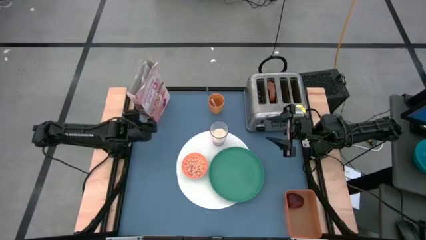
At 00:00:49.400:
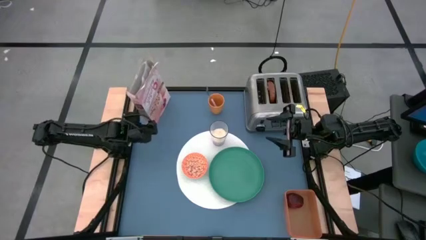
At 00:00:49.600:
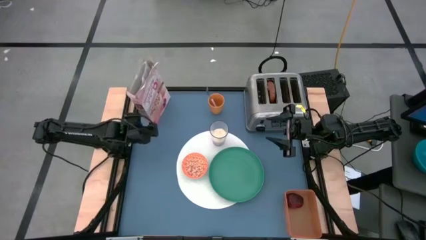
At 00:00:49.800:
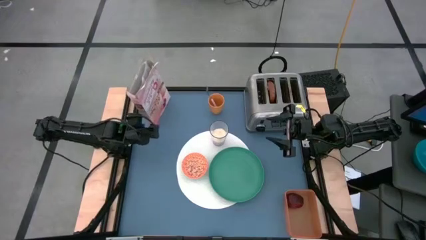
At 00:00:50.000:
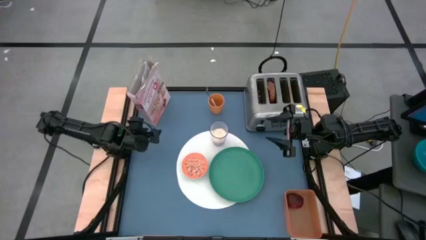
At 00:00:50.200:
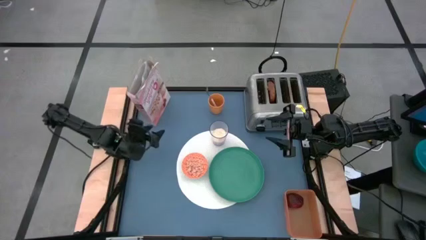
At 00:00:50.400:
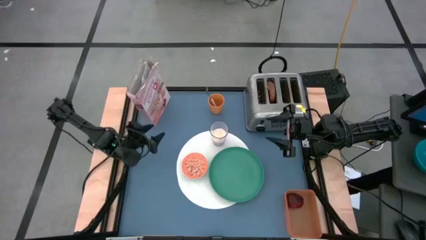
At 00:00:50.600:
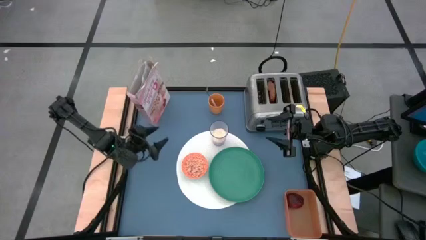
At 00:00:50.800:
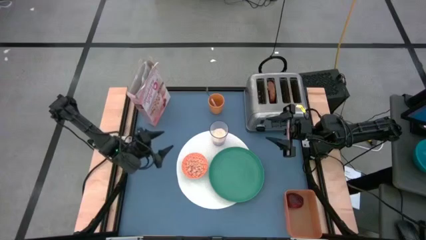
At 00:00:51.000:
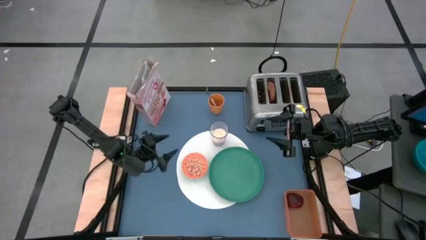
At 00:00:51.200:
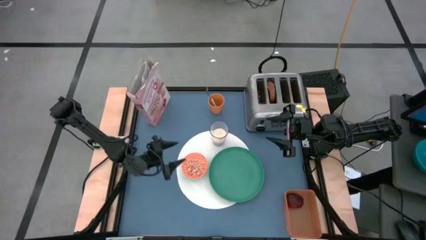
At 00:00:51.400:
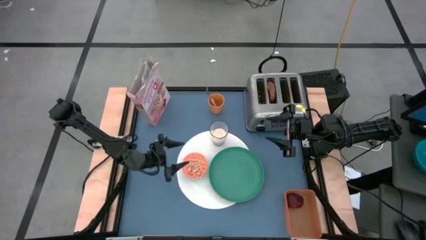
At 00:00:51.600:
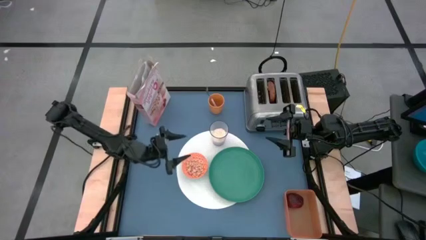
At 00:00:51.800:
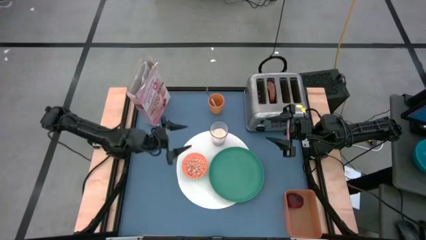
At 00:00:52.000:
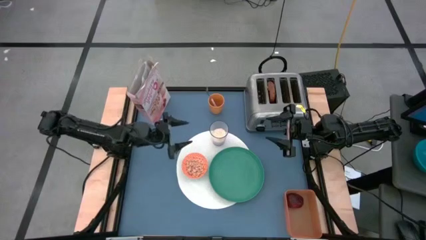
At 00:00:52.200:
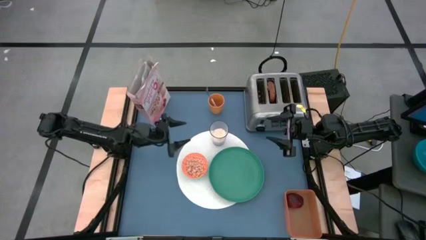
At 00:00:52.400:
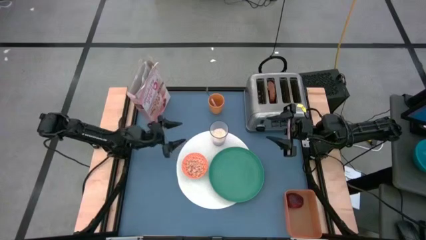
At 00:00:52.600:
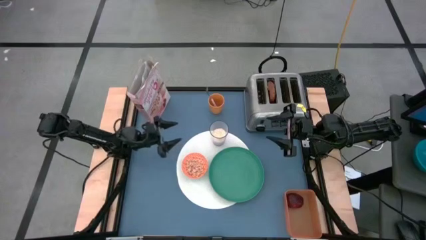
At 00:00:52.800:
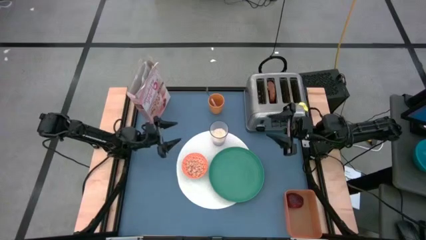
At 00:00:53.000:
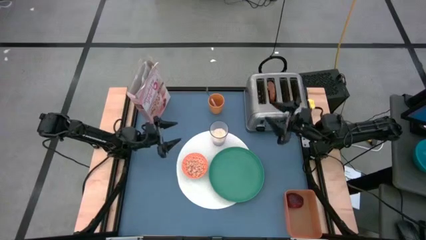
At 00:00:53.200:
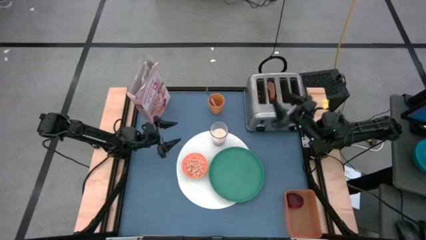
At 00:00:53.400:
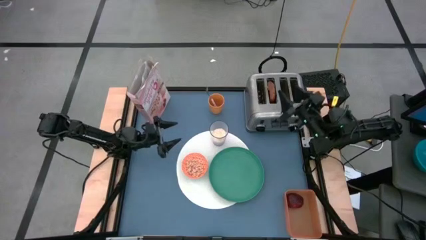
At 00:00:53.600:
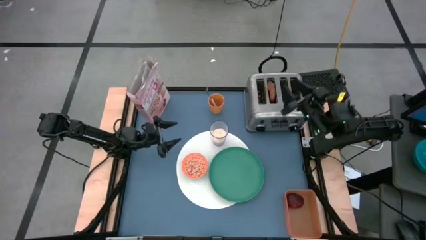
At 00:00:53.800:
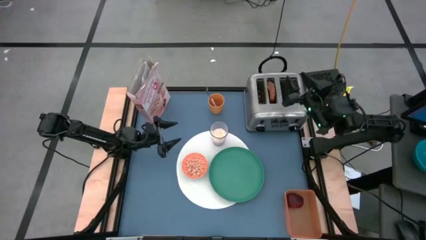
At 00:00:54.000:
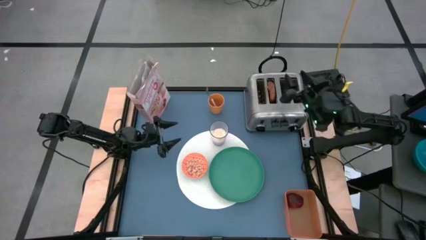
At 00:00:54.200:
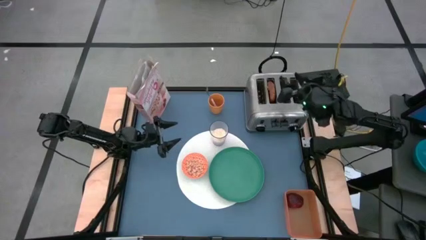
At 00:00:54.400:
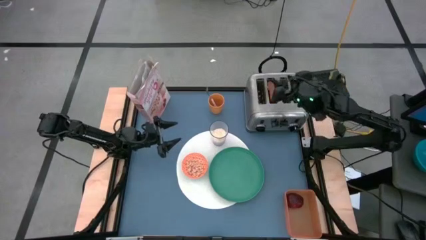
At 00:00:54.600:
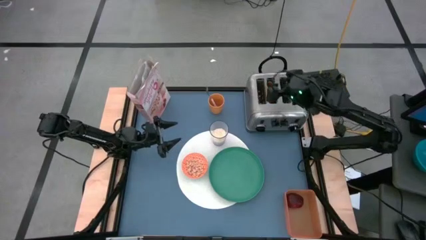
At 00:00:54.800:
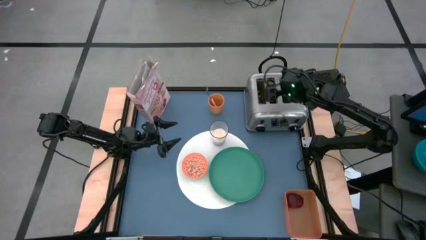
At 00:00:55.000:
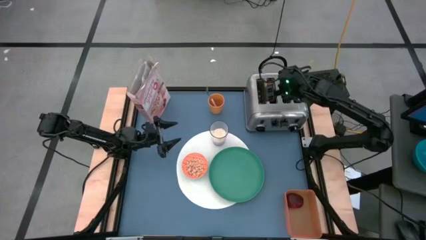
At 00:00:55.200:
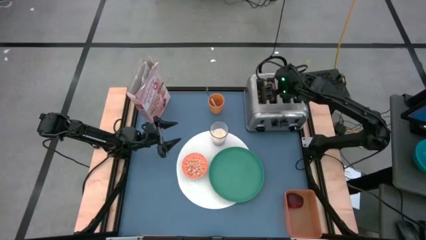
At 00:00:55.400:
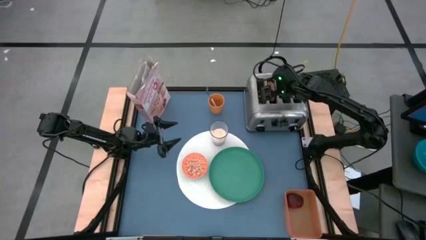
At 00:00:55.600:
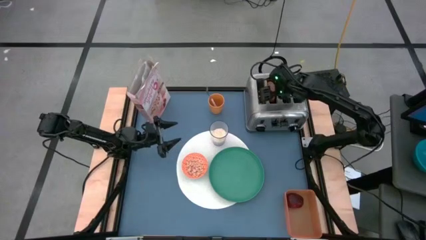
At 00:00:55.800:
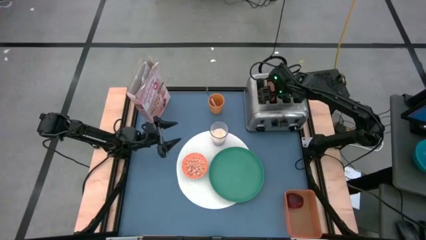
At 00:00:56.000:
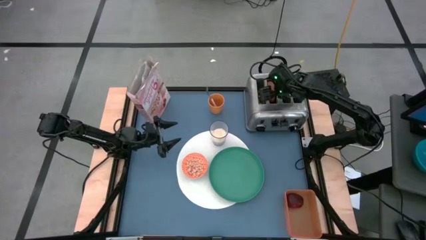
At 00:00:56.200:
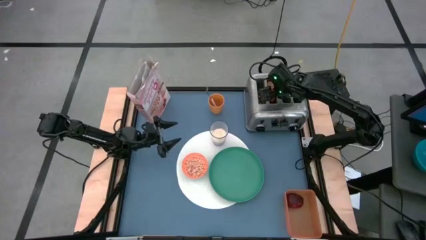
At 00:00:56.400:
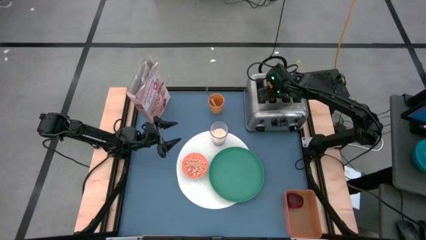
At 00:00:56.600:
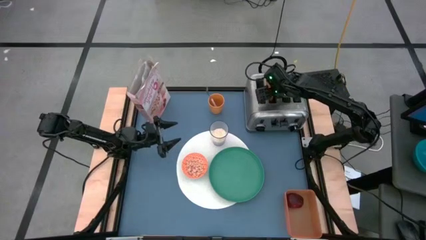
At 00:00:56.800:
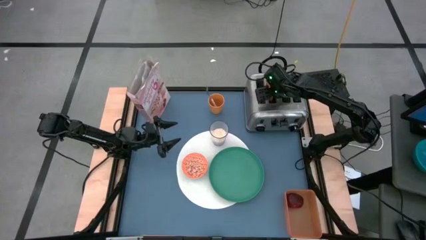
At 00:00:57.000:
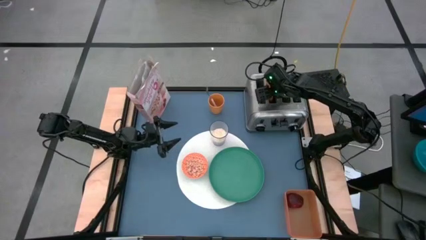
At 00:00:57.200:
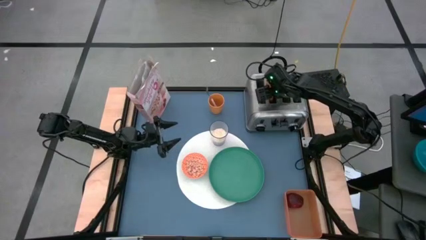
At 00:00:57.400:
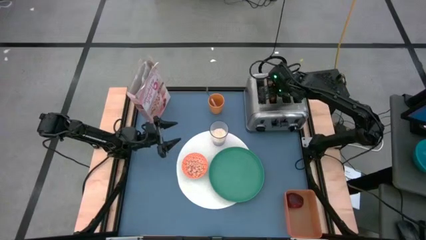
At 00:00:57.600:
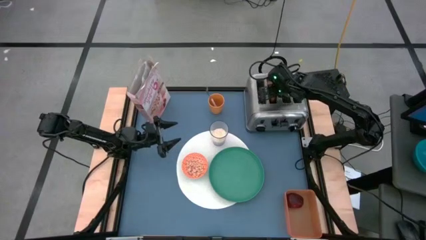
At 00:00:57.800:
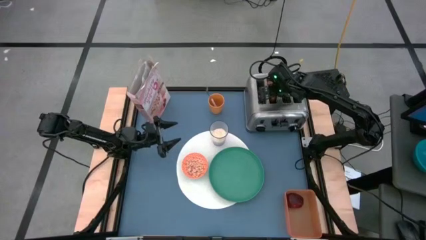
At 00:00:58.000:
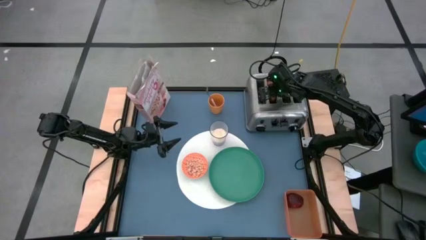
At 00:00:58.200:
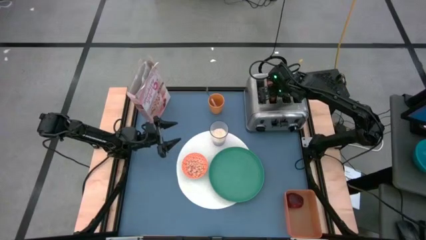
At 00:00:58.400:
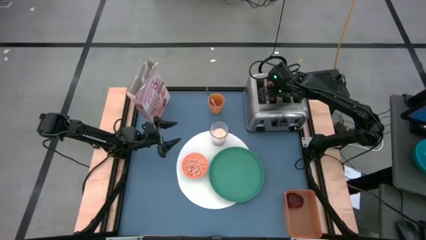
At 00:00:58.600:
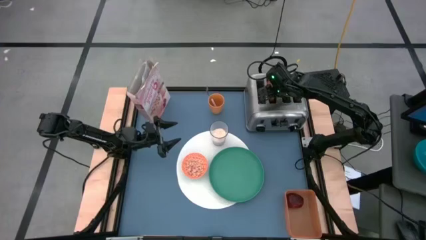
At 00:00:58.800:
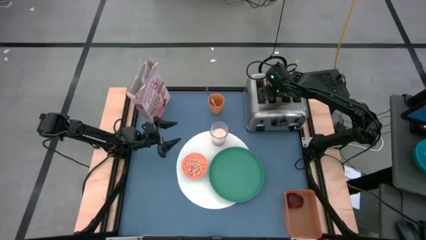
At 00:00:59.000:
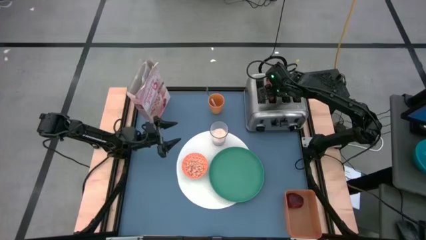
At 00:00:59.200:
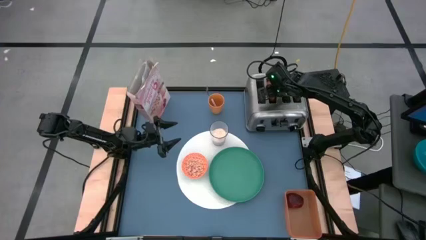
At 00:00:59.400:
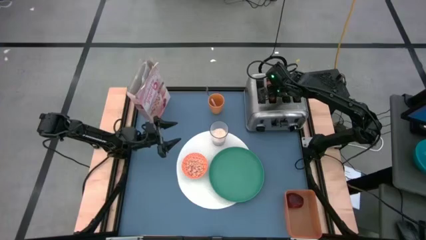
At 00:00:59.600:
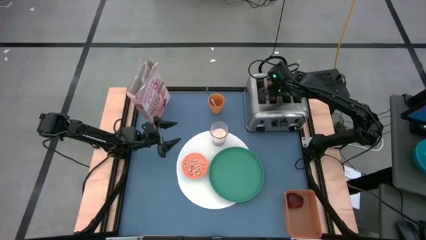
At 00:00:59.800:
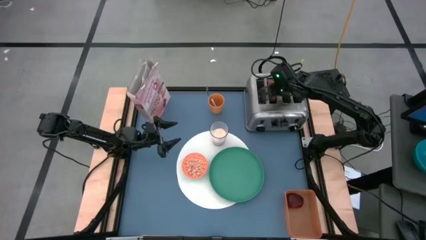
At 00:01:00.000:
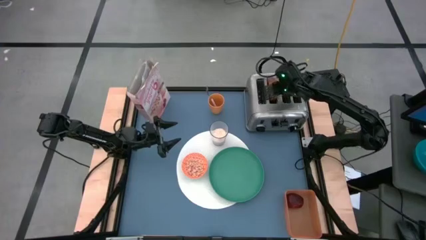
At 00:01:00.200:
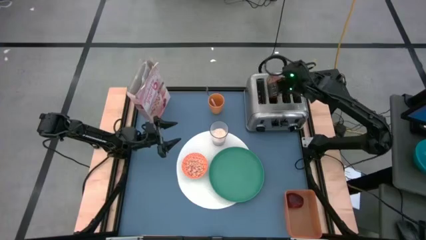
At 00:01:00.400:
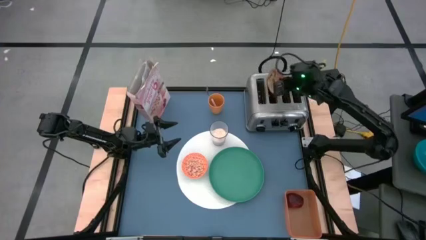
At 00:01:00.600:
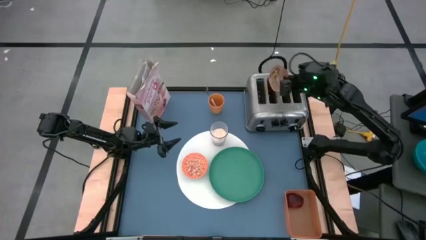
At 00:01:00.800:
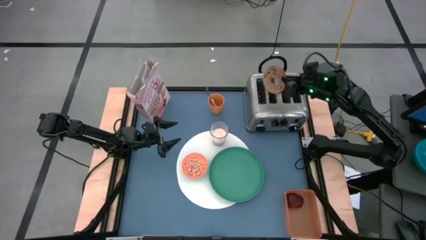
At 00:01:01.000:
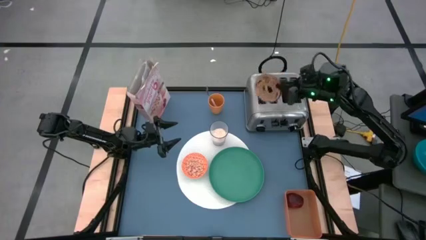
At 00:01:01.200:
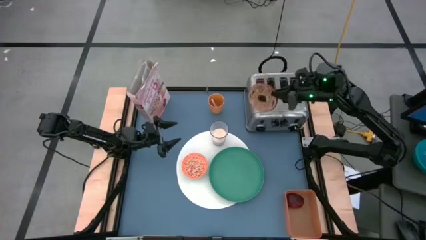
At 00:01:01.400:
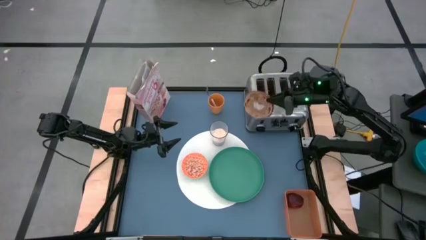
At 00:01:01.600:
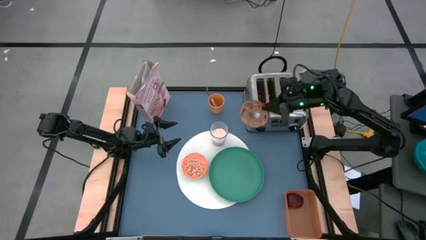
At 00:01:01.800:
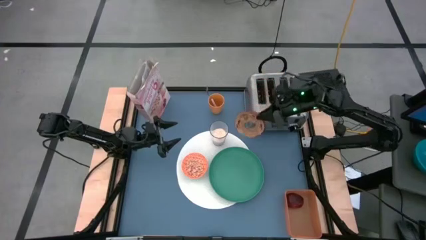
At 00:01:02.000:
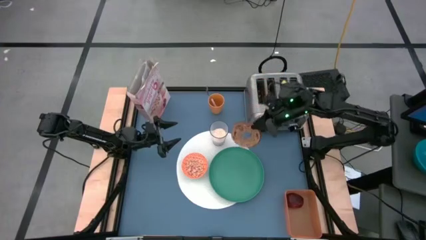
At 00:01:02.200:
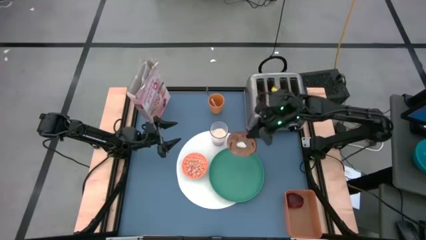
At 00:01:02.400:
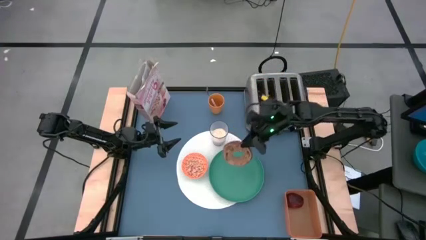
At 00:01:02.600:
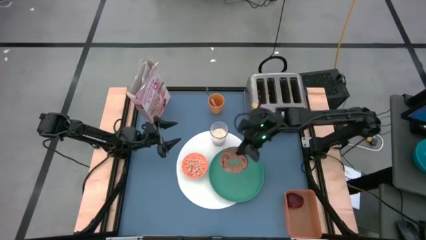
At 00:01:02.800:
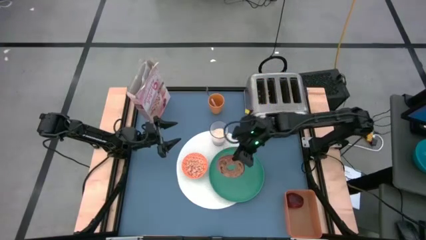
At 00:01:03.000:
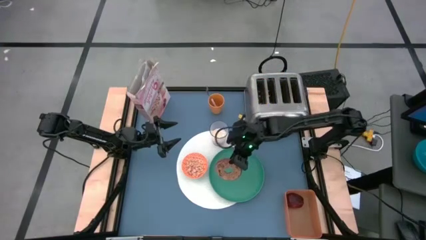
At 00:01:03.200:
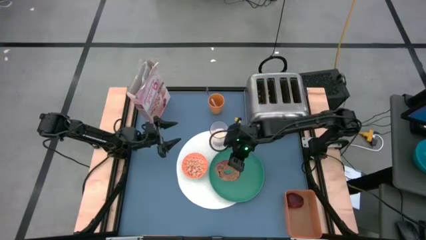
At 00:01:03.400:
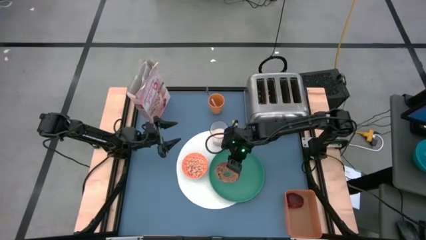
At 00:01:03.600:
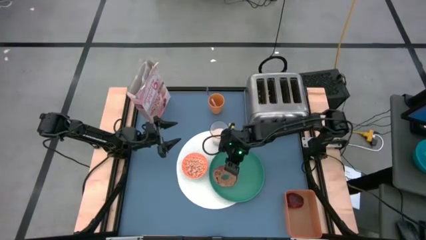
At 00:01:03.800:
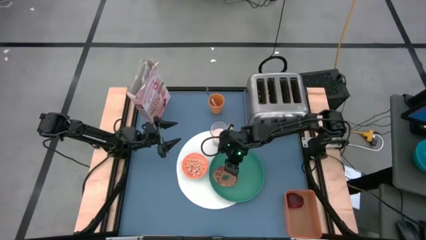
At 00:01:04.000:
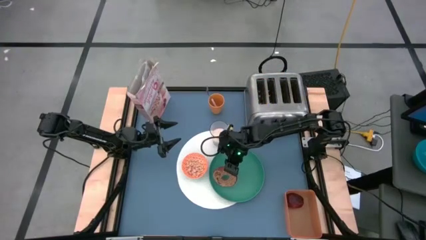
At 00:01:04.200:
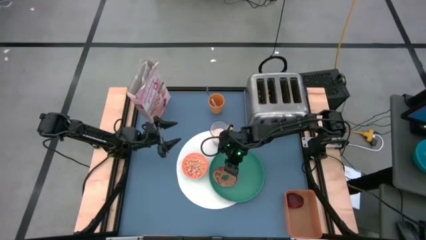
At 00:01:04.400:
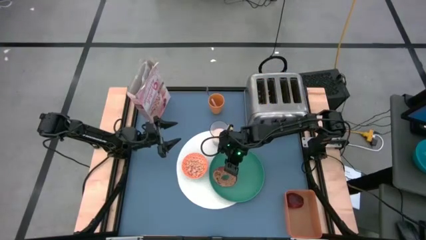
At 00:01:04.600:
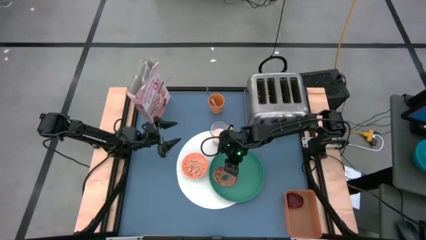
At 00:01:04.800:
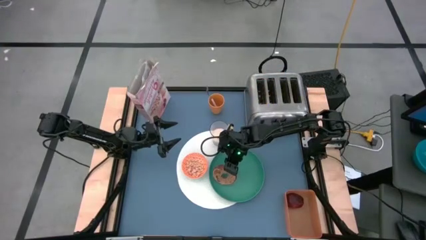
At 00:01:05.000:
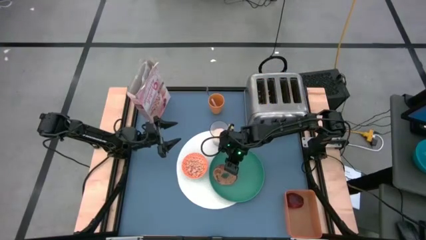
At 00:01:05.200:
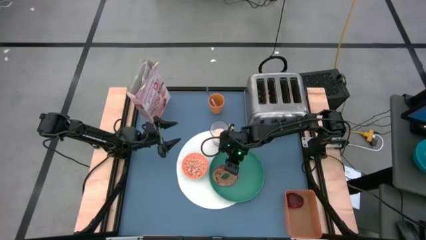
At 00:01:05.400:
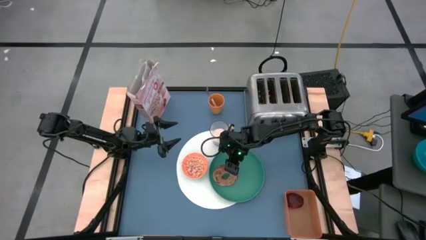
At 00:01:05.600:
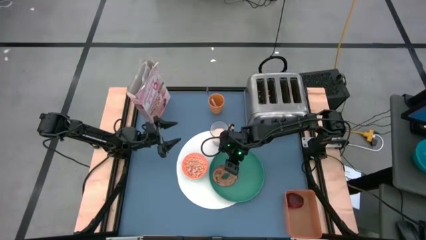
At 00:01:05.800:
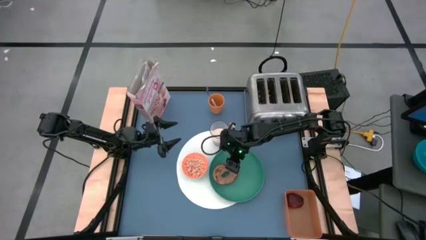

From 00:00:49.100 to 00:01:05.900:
Task: Arrange a breakfast setting
Put the toasted bagel on the green plate
